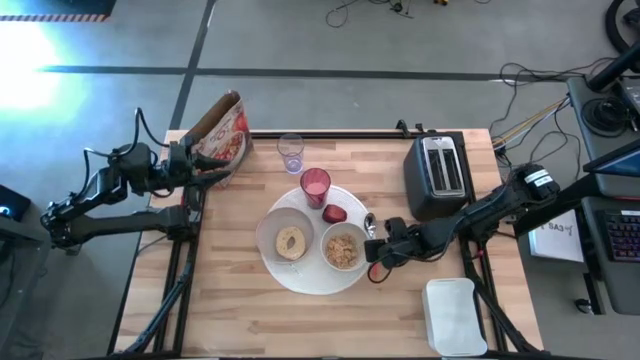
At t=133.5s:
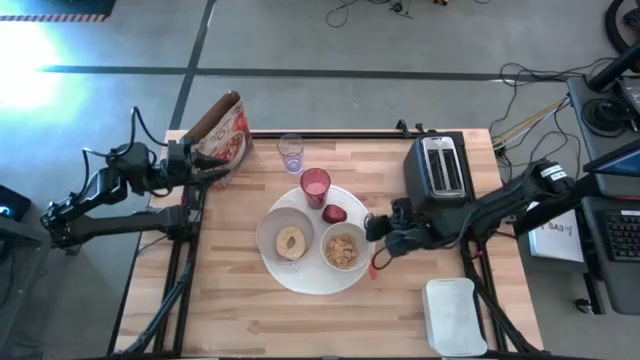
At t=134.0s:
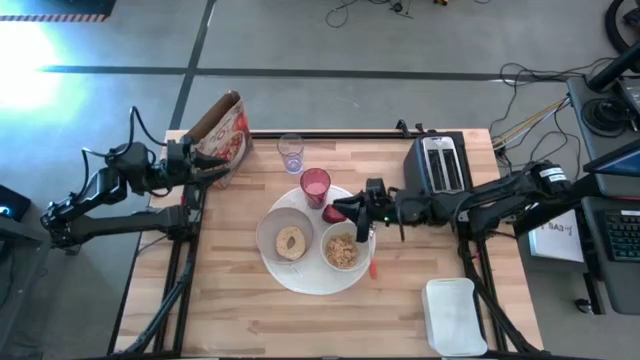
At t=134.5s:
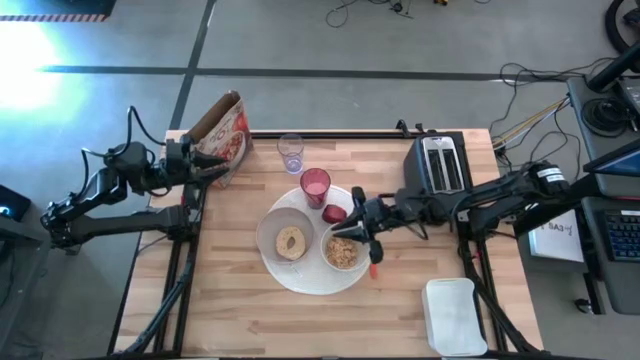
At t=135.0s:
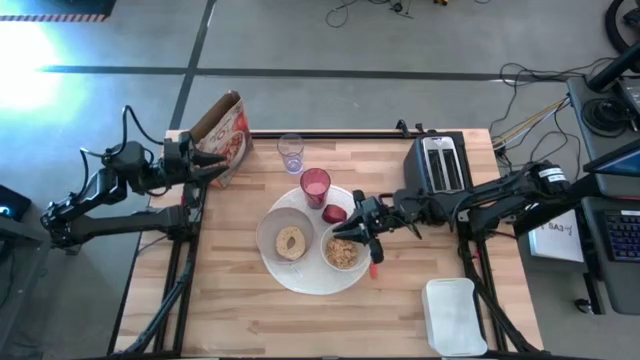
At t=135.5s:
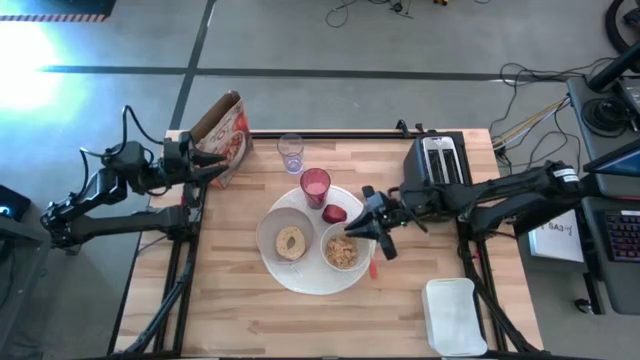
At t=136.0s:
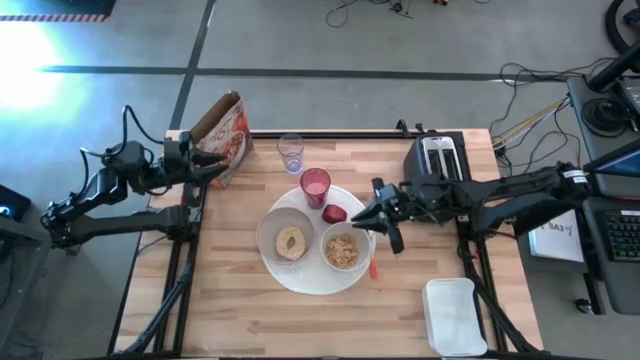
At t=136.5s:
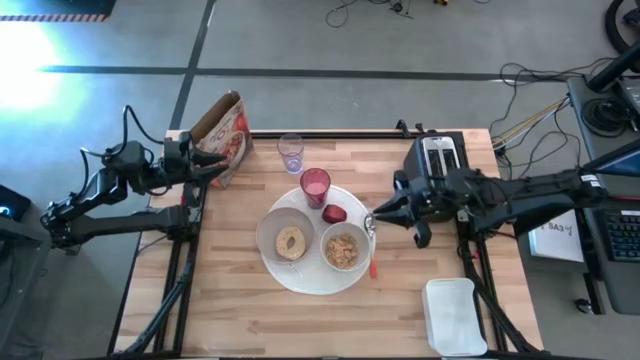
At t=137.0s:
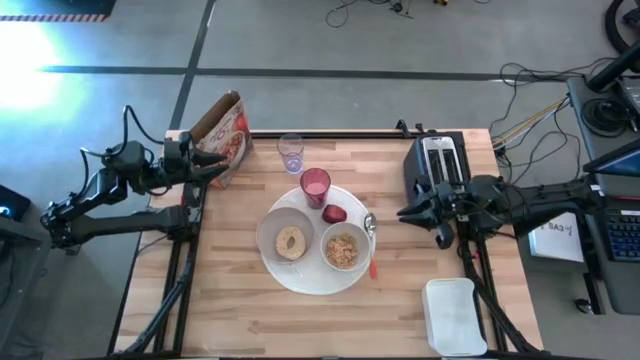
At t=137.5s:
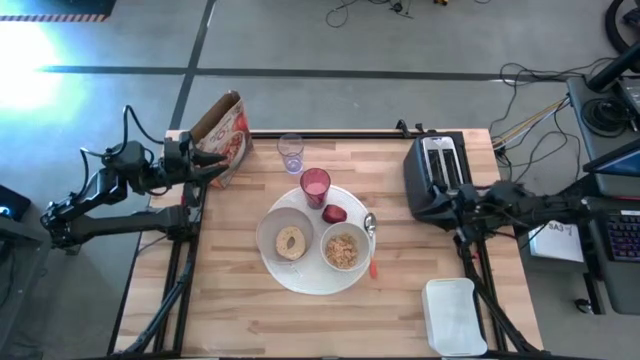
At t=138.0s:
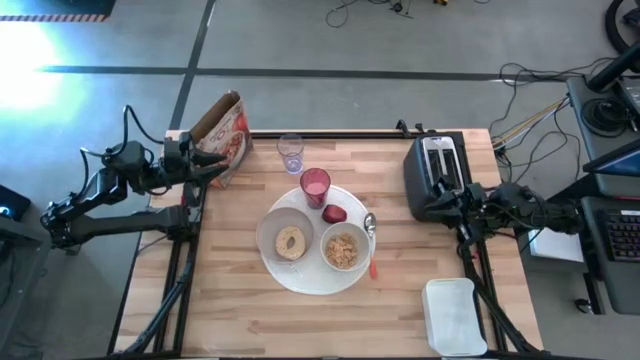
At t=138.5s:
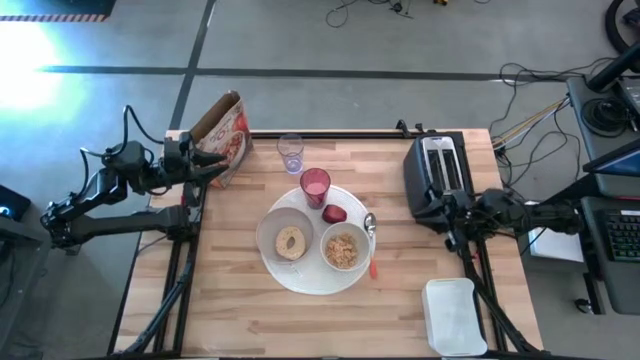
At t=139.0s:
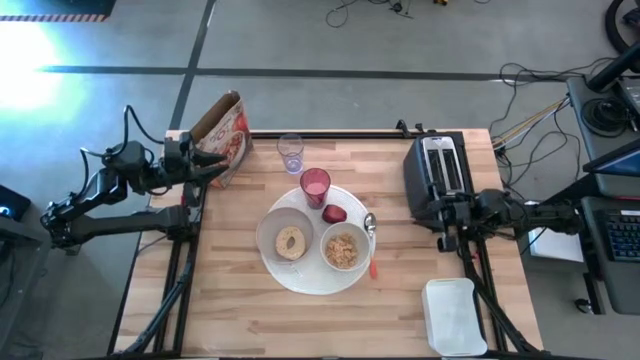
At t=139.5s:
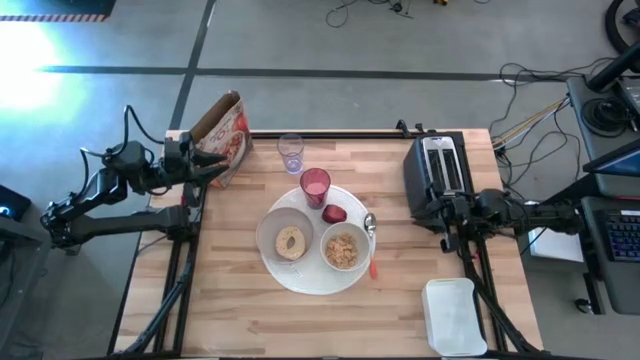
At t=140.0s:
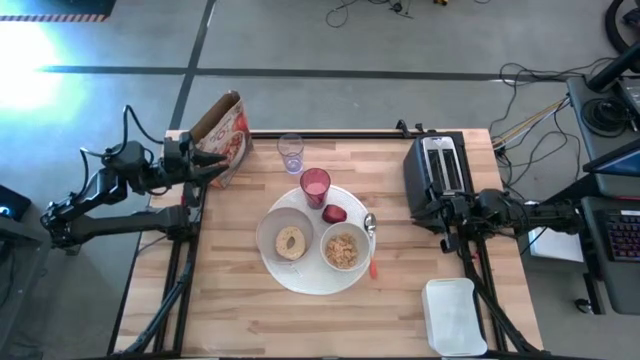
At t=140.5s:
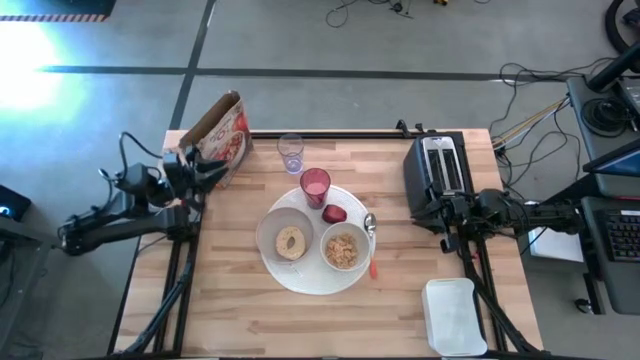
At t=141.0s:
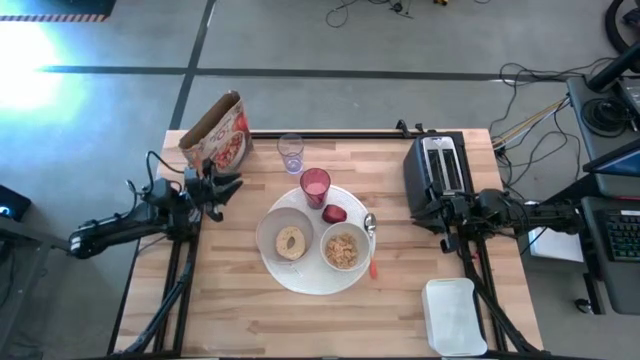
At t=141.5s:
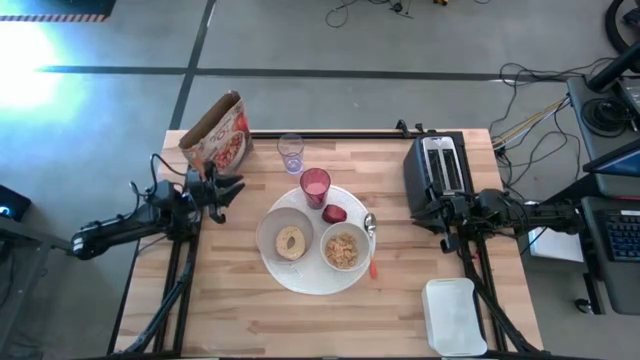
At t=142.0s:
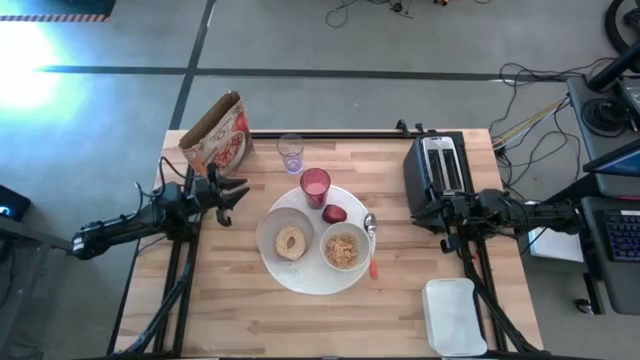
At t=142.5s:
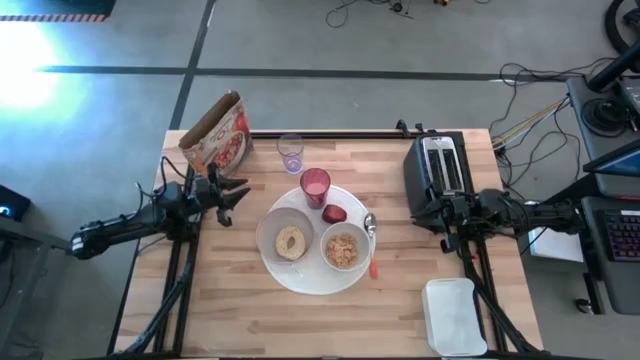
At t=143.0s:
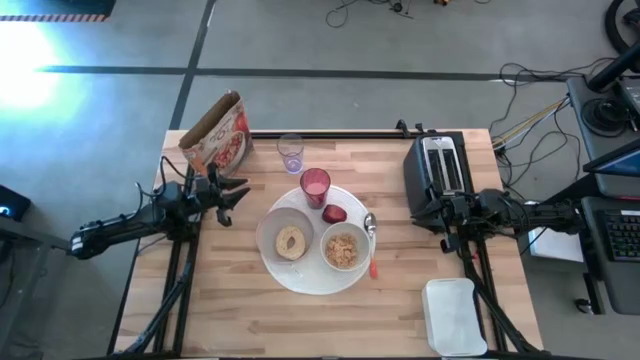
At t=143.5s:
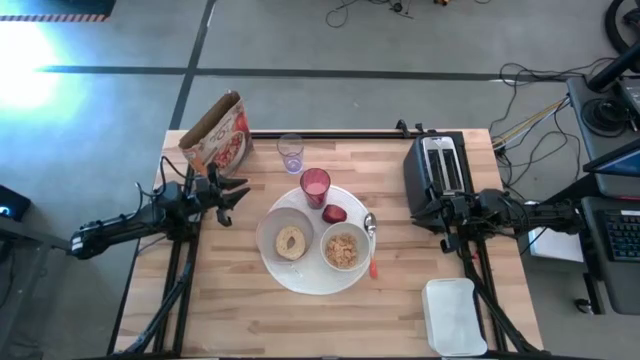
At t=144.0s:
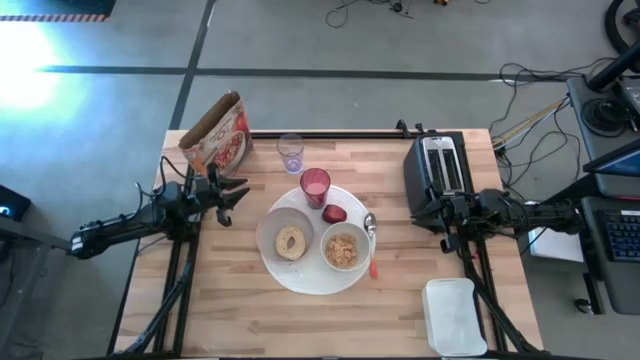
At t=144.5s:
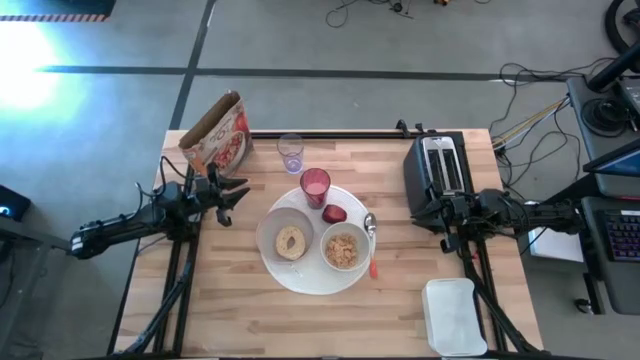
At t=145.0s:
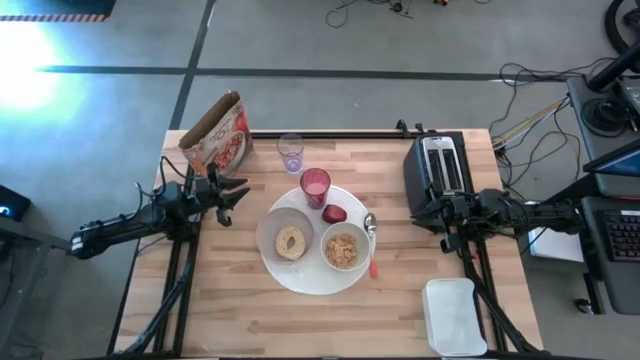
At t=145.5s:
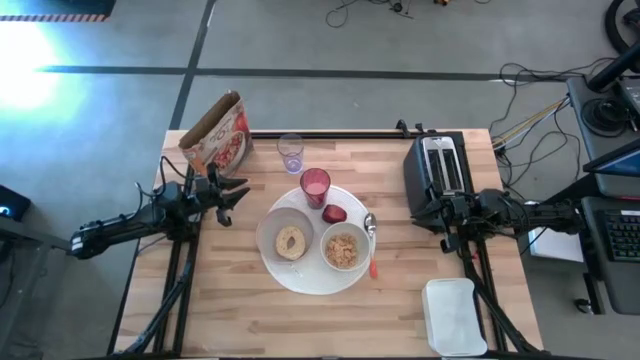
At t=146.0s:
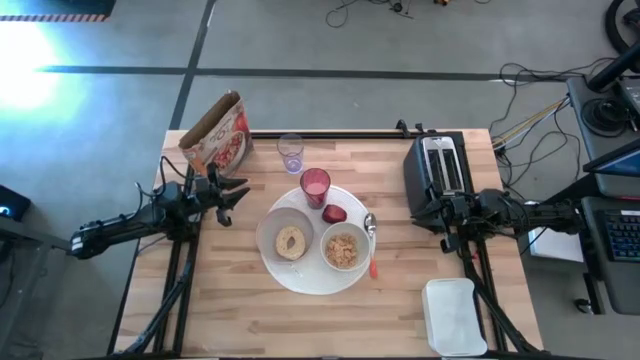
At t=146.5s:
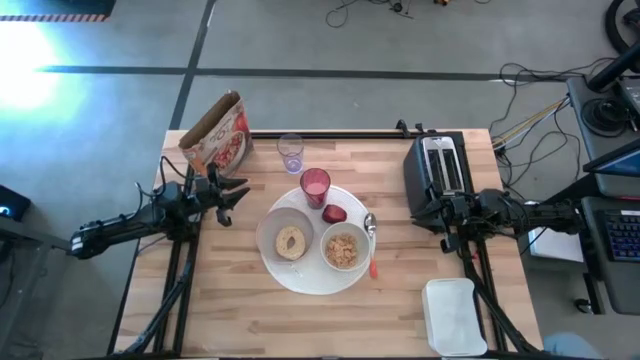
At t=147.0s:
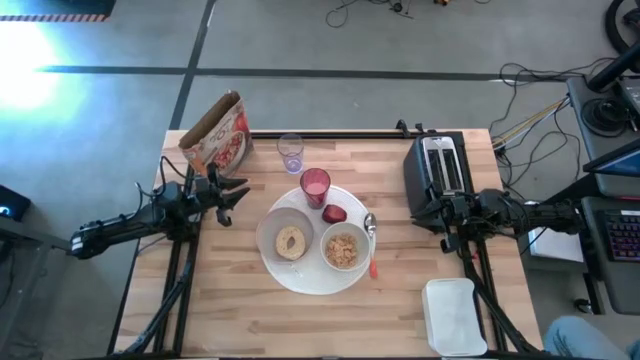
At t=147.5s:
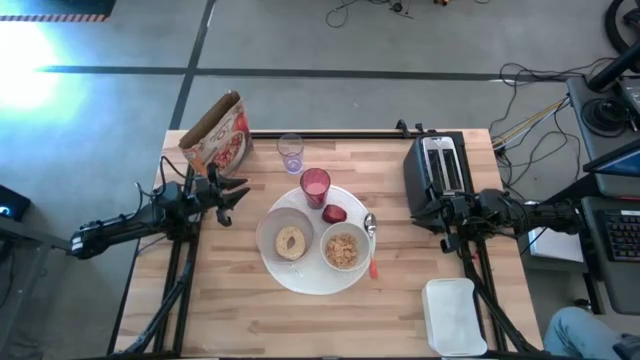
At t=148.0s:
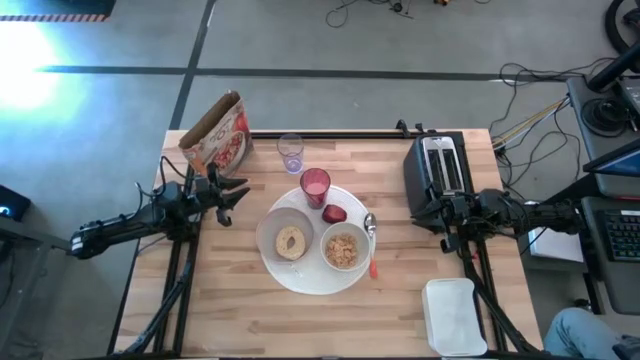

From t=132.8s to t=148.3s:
Task: Arrange a breakfast setting
Return to Home Position

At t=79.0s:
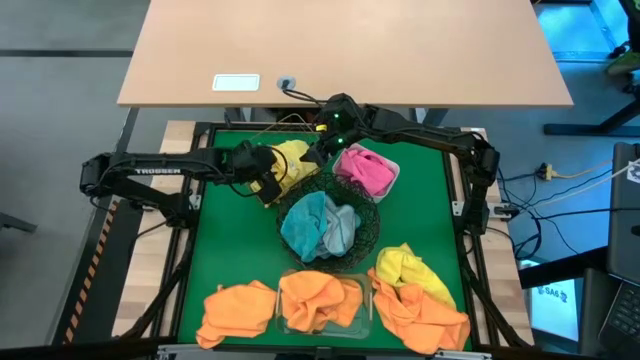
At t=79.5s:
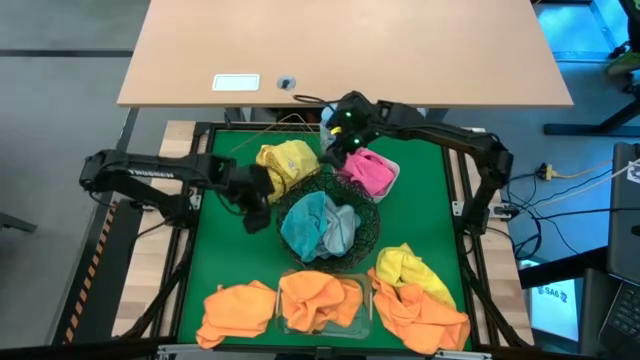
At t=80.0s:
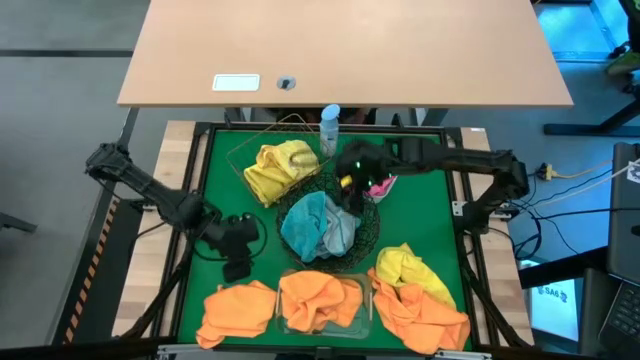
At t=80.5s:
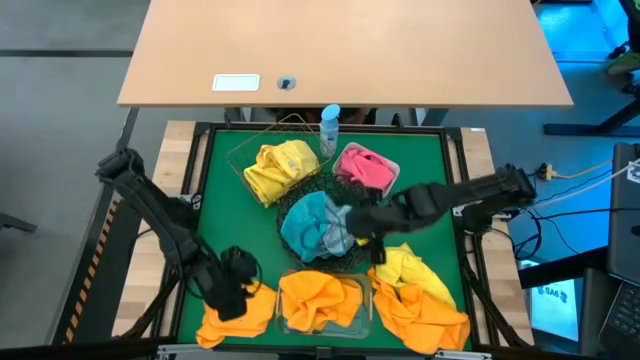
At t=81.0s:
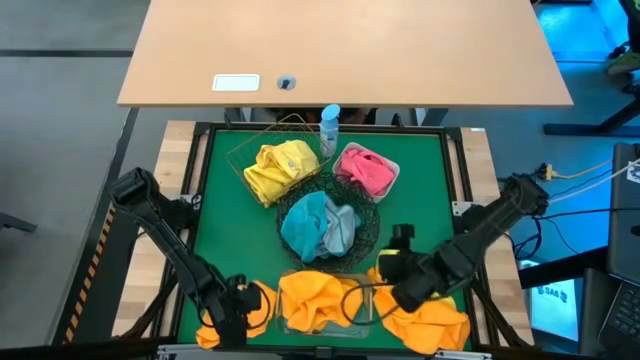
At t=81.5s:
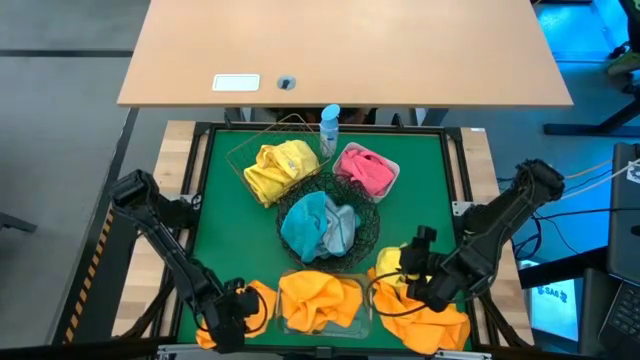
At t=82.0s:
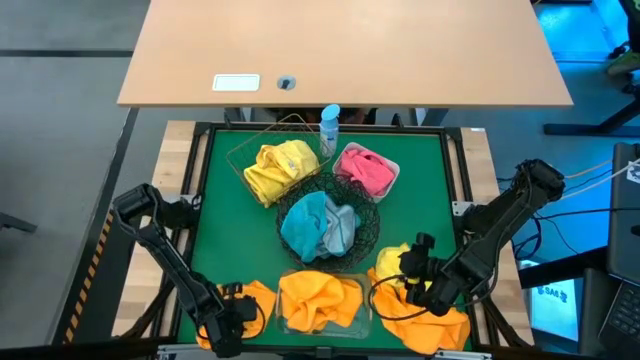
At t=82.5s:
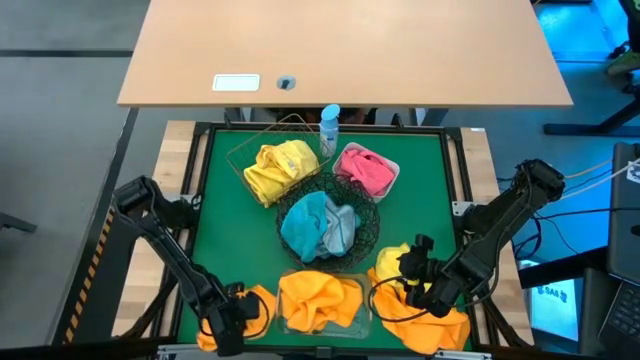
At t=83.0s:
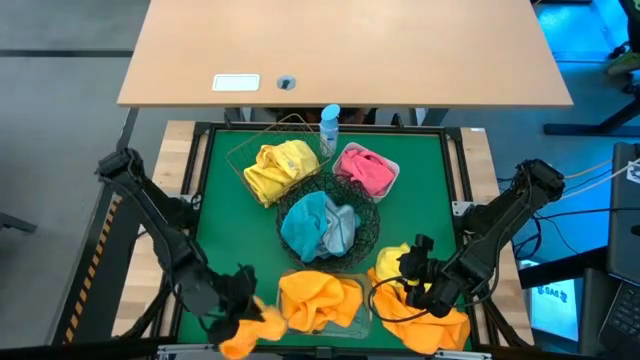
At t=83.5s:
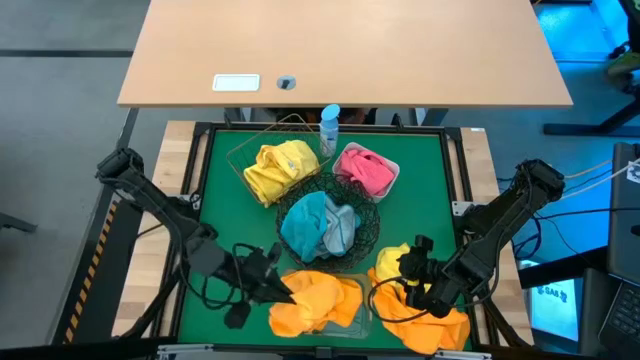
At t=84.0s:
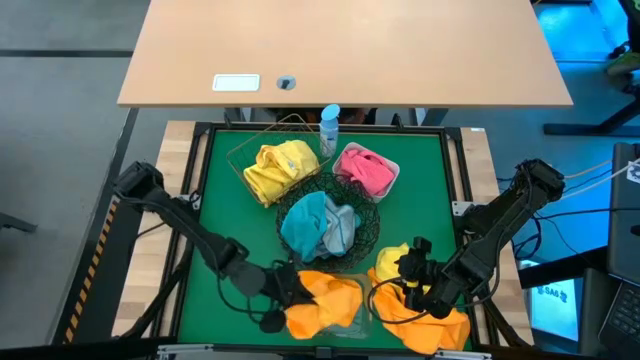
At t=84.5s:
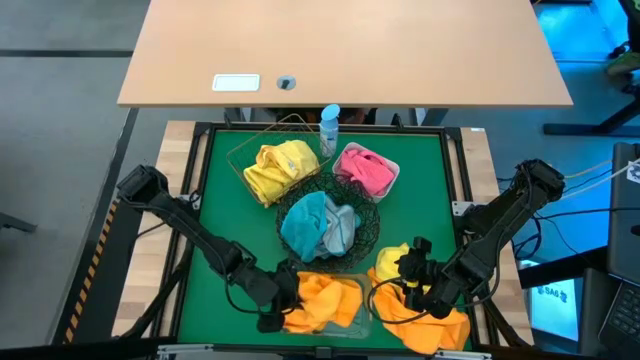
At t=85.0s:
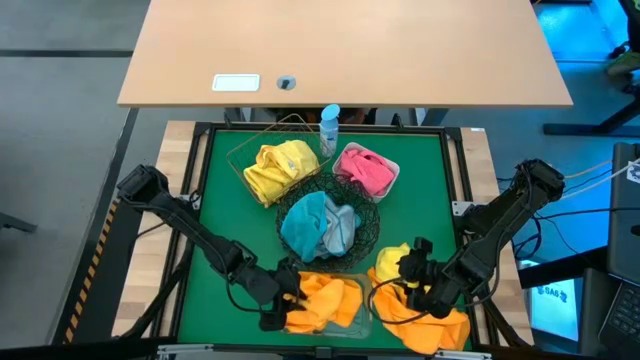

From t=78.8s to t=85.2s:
Task: Sort microfiber towel by color & place in baskets
Put the orange microfiber towel into the transparent bin
